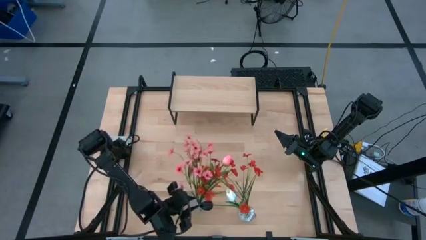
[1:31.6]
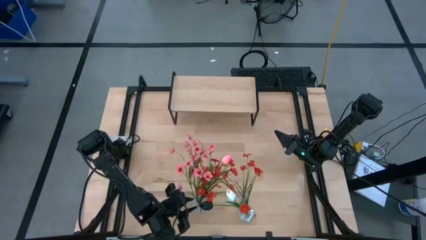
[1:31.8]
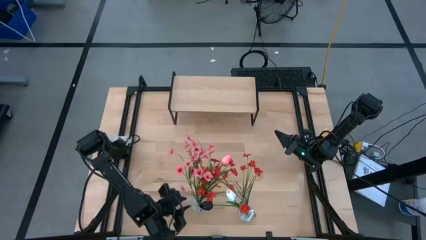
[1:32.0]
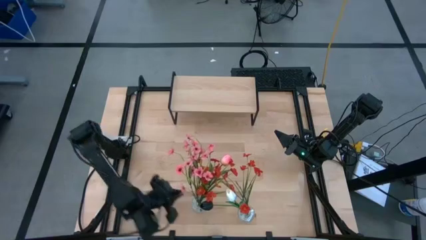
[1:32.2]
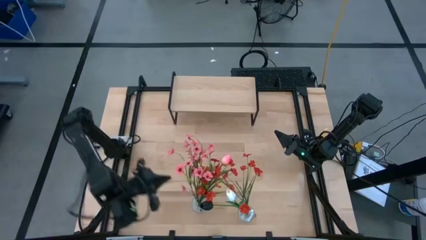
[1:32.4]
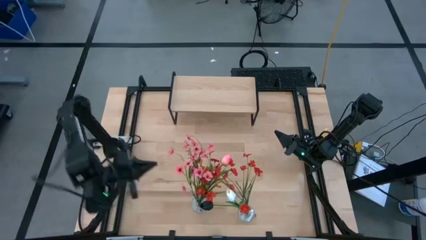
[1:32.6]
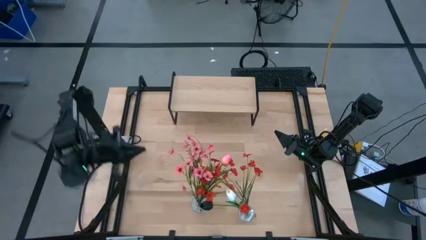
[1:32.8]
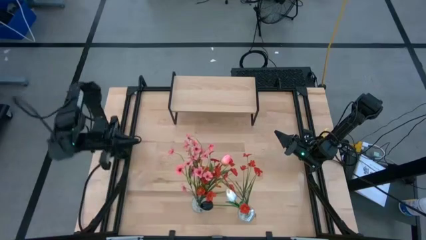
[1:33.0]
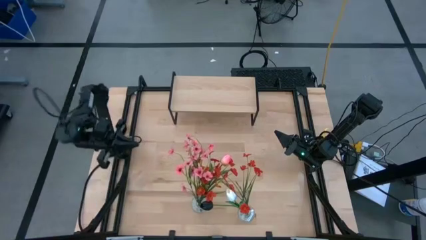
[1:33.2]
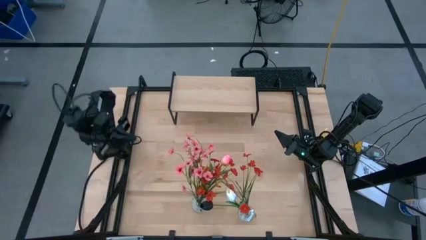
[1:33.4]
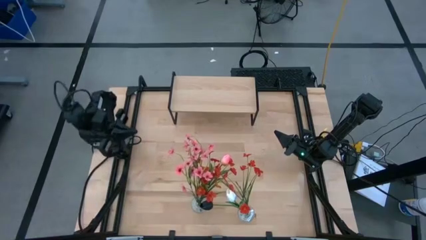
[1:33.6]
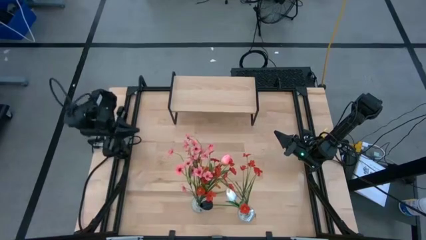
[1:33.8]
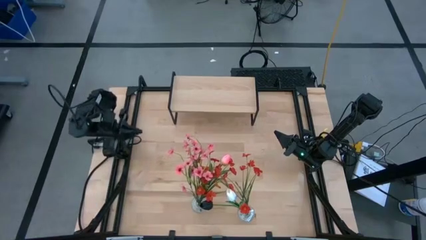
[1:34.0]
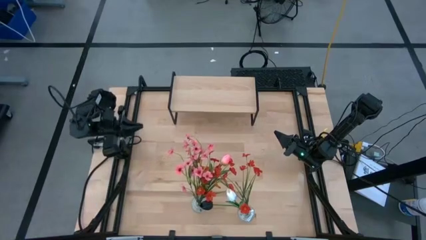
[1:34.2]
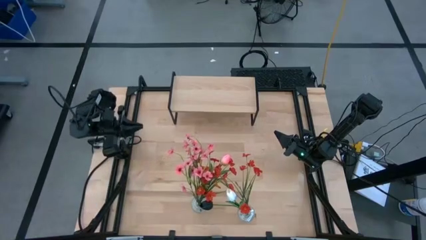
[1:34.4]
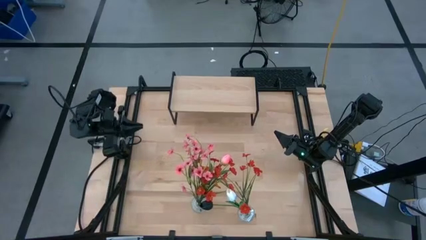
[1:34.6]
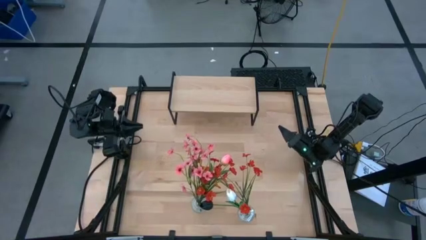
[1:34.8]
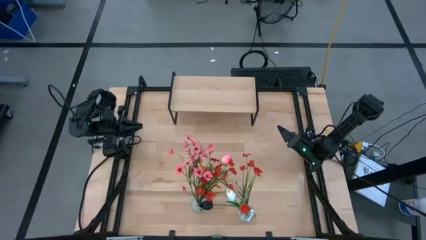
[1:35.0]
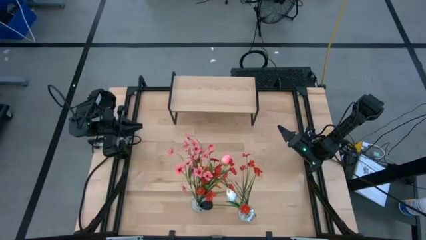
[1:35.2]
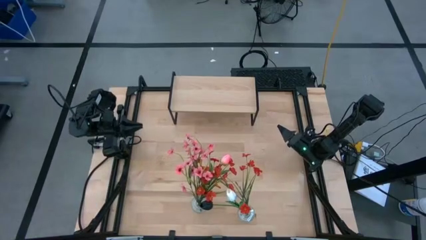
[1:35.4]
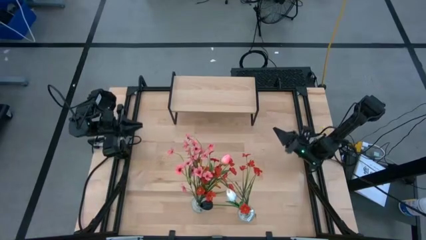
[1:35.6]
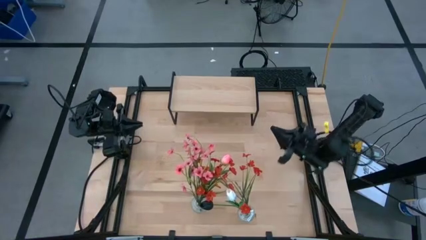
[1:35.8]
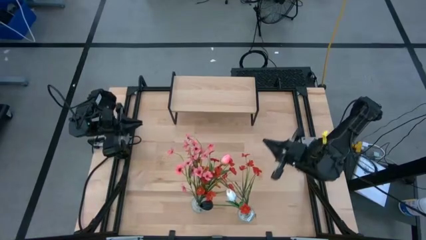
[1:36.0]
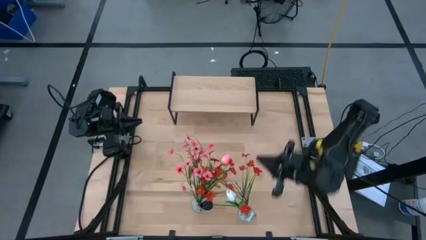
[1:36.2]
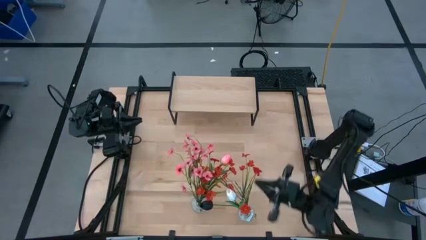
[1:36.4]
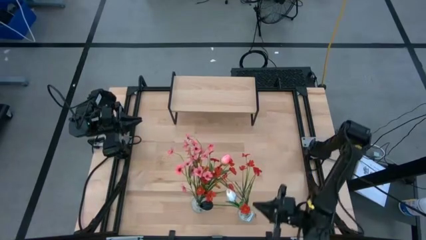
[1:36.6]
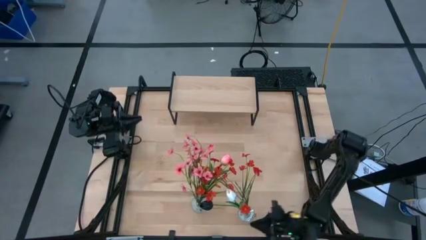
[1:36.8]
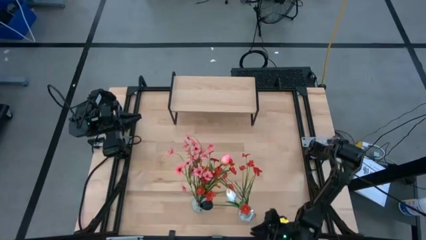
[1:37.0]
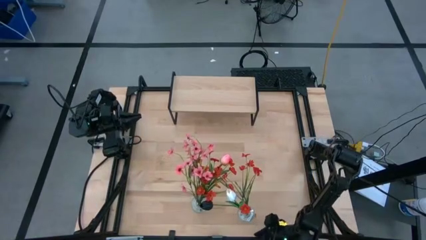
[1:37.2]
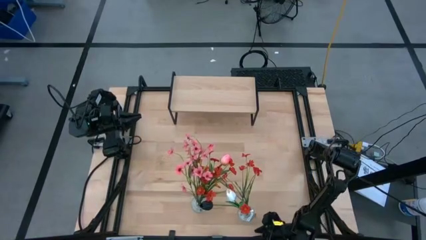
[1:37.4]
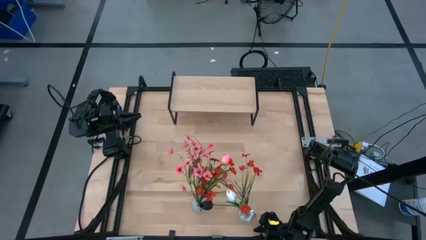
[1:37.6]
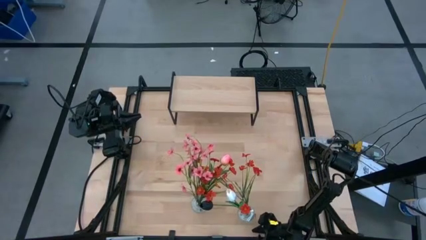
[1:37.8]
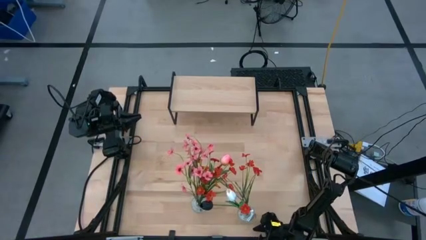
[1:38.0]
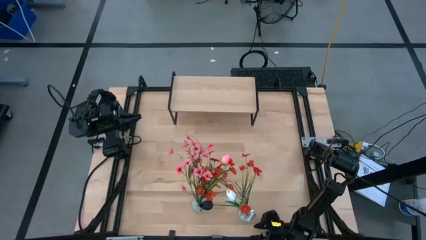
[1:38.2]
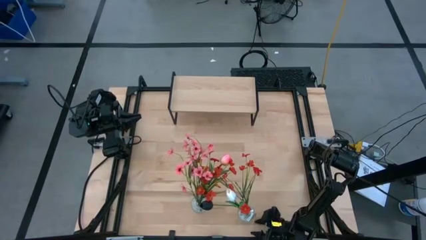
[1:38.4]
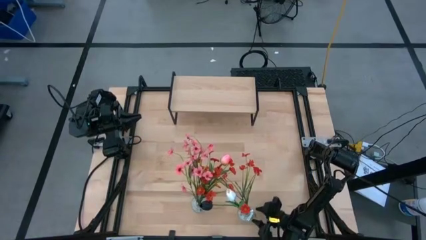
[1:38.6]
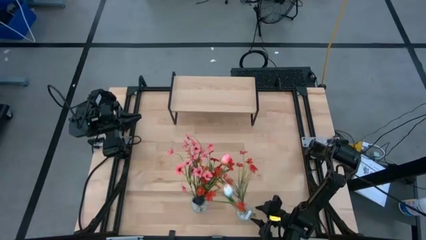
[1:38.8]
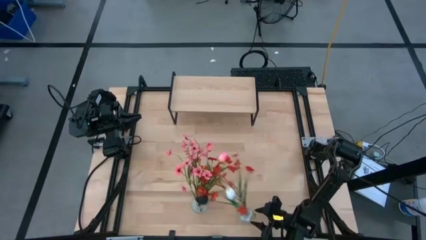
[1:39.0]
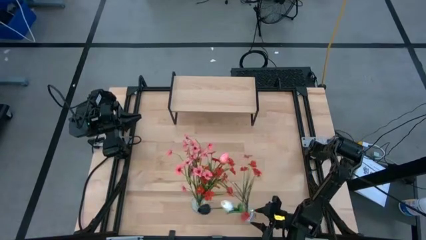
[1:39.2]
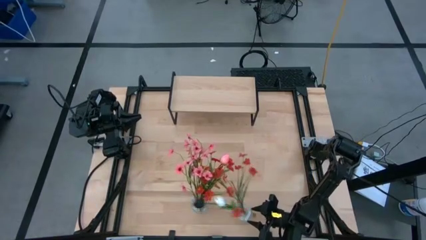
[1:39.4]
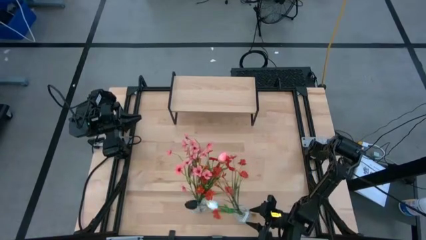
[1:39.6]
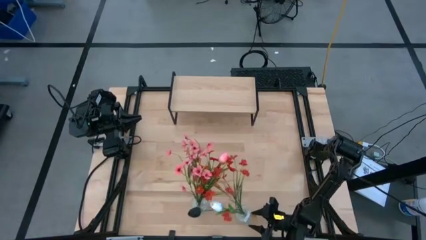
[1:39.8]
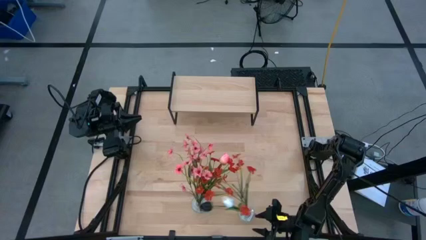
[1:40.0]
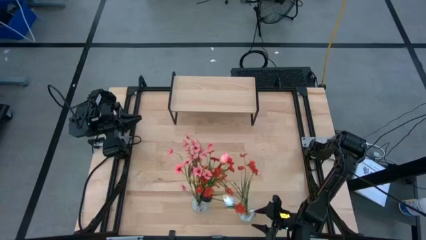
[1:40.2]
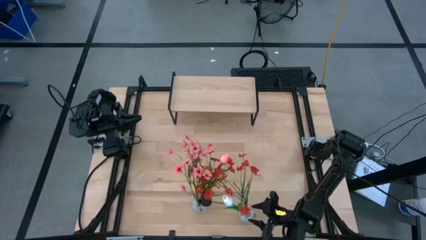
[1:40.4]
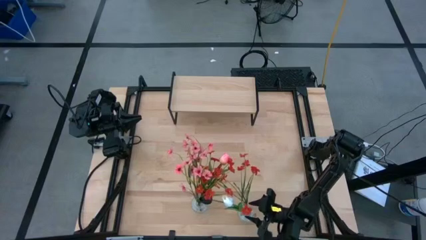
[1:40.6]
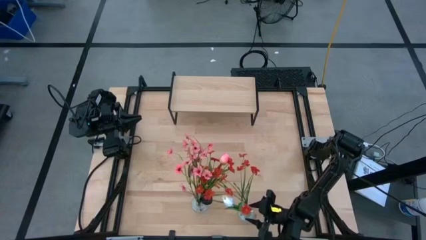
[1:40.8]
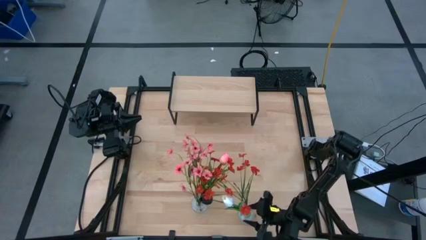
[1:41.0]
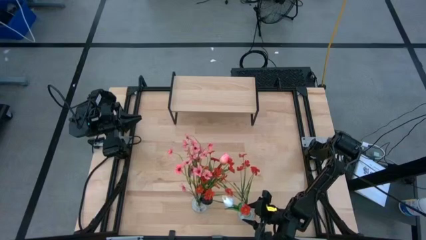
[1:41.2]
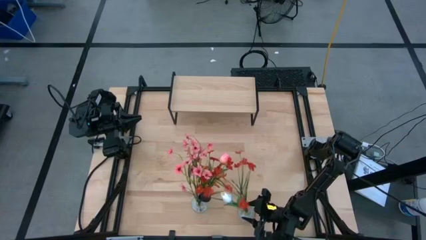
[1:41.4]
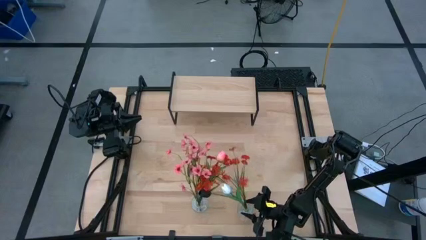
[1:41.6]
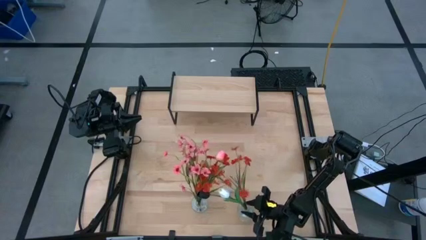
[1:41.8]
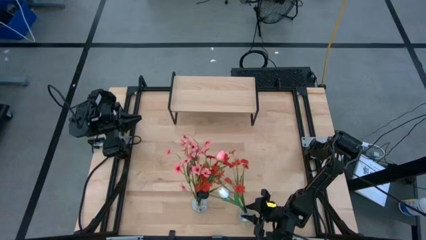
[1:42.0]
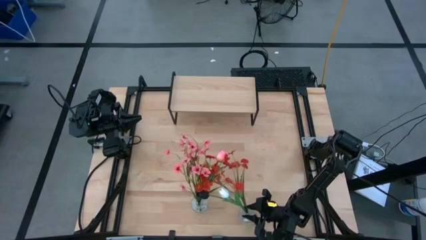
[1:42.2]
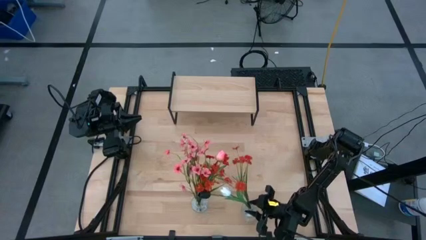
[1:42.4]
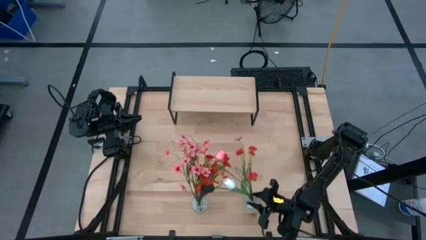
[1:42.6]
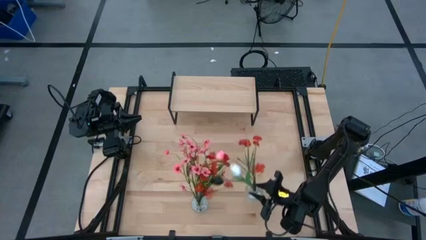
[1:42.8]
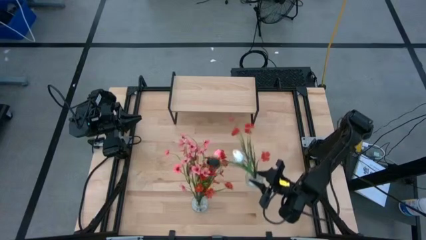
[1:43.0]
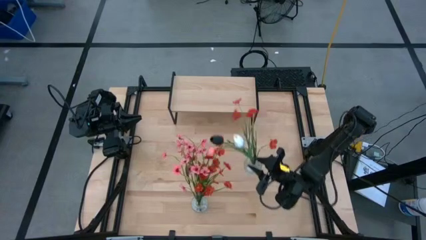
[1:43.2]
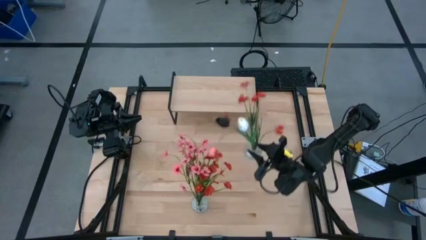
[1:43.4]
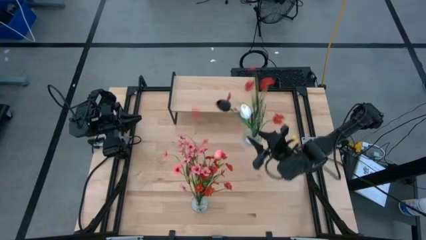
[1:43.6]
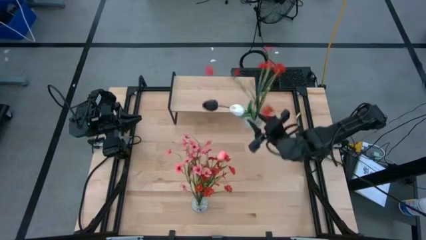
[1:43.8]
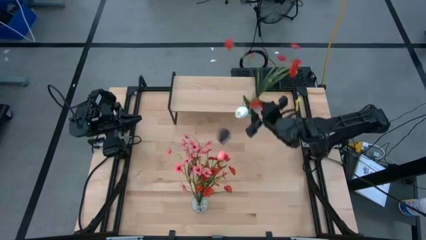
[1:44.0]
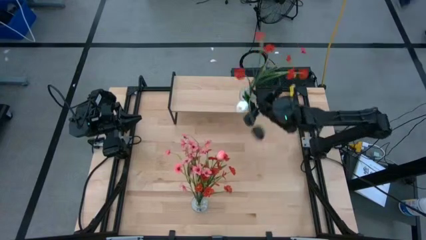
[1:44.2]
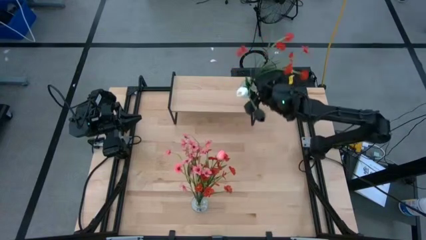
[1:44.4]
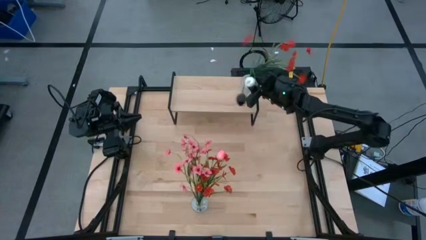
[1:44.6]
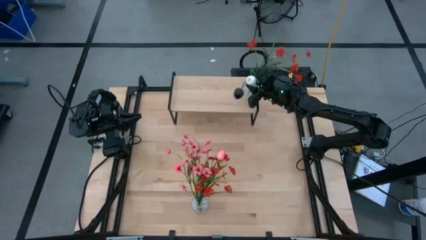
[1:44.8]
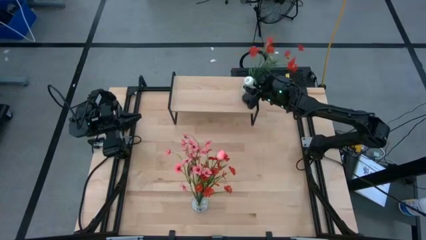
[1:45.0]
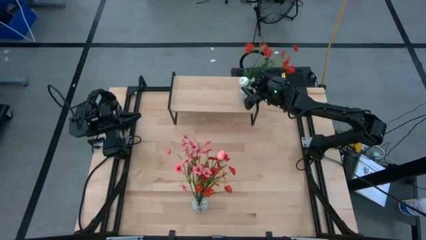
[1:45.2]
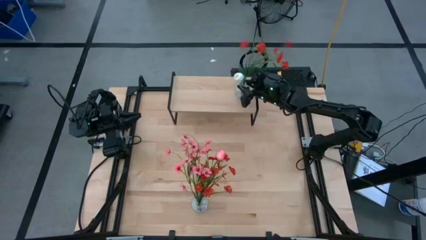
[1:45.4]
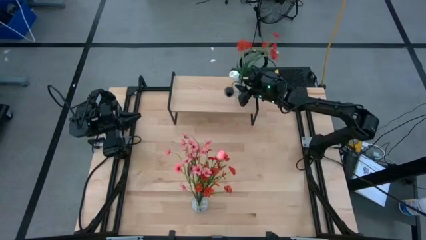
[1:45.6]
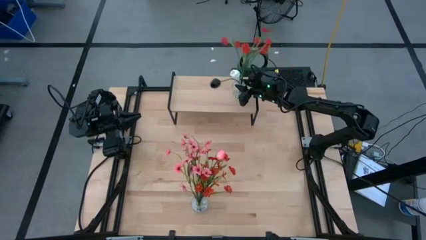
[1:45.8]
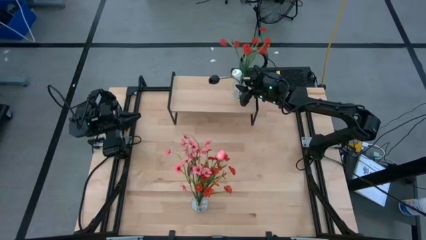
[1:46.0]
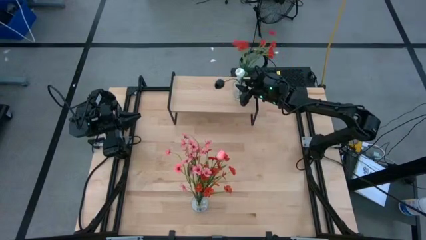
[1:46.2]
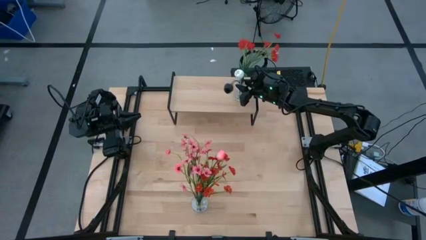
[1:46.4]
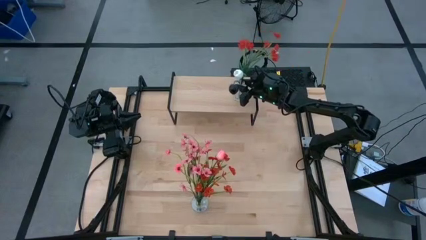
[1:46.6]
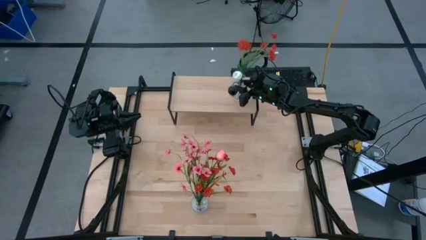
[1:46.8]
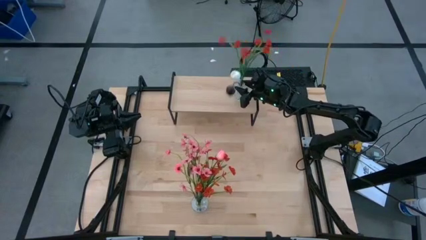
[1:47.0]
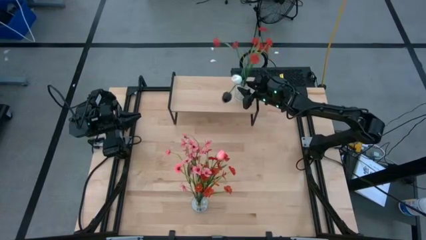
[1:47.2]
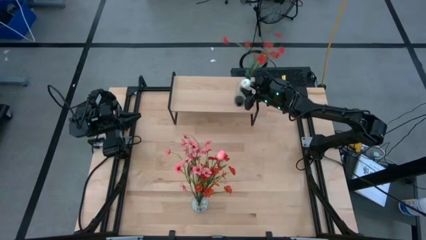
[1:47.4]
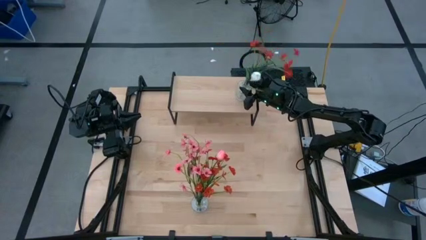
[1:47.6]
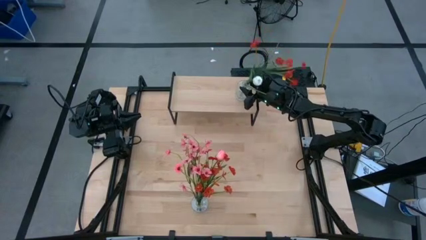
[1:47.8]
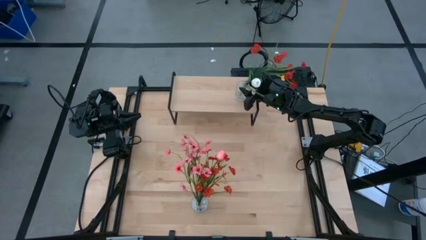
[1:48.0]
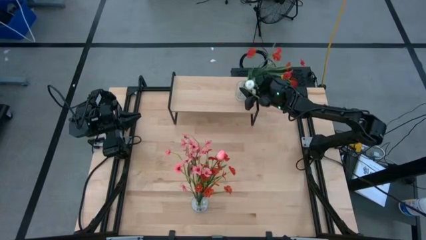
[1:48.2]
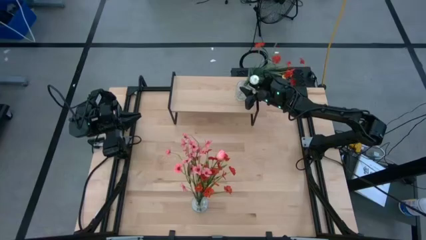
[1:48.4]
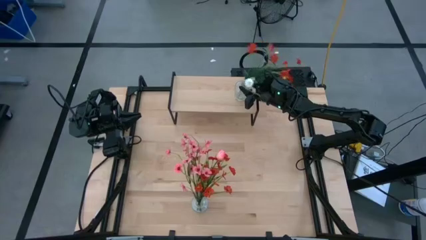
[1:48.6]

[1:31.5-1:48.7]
Task: Pick and place flowers into a vace then onto a shelf
Put the right transparent vase with flowers on the shelf
